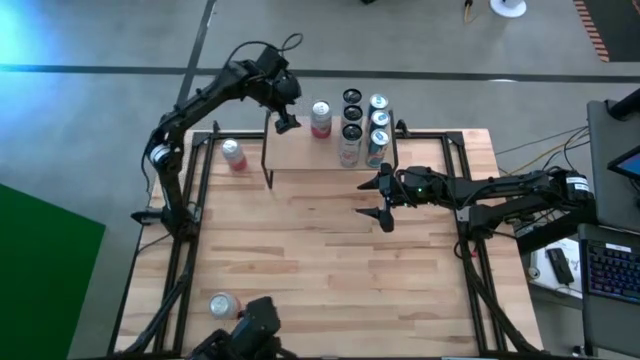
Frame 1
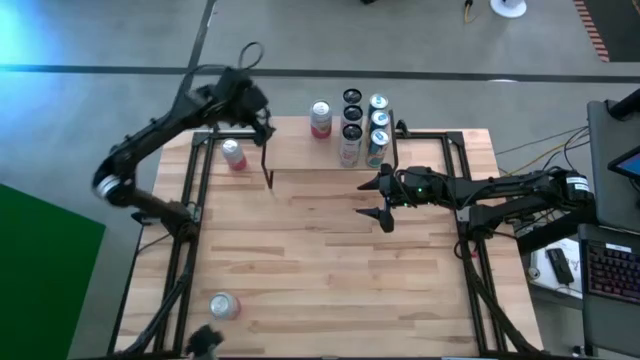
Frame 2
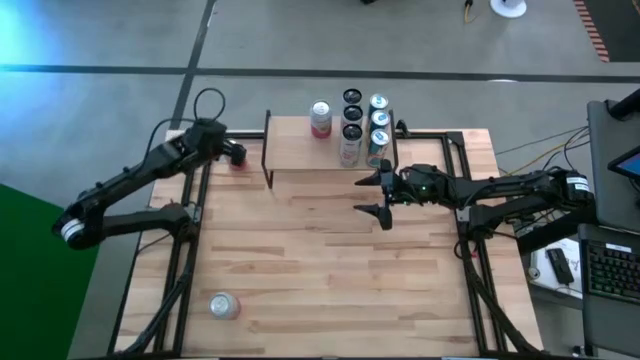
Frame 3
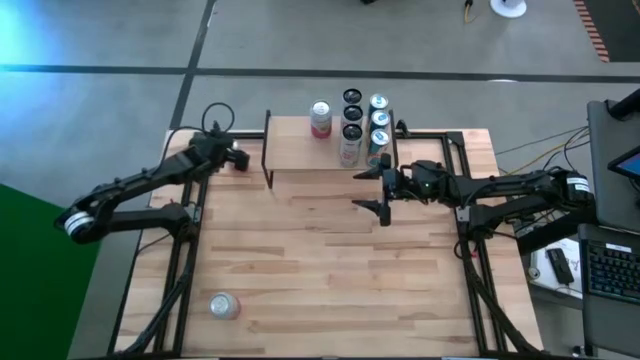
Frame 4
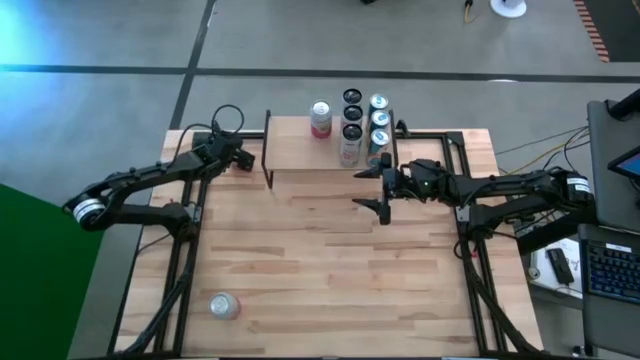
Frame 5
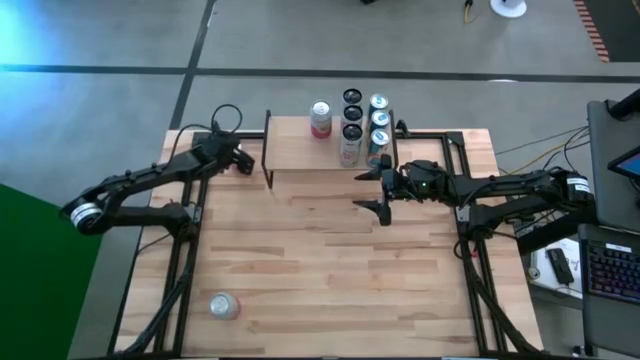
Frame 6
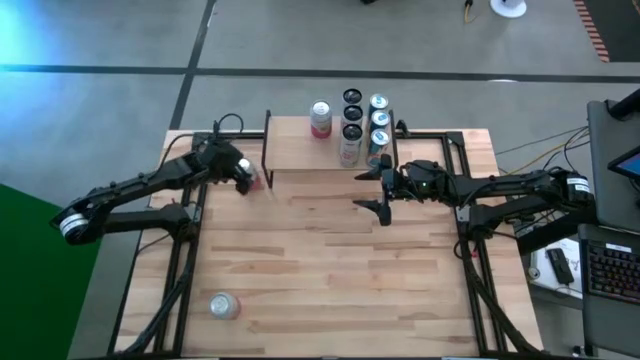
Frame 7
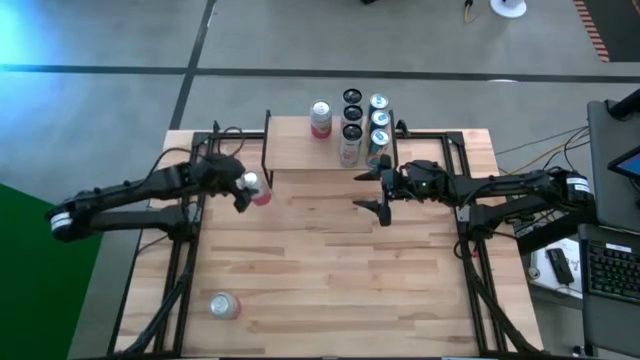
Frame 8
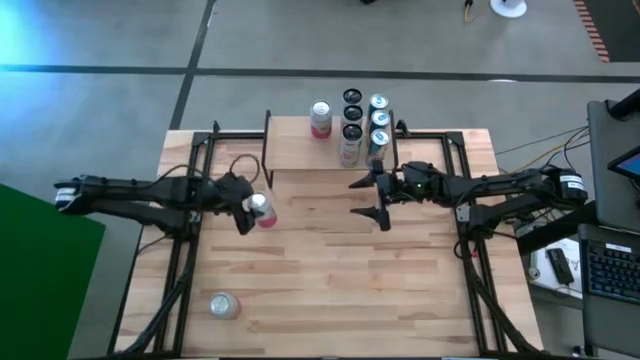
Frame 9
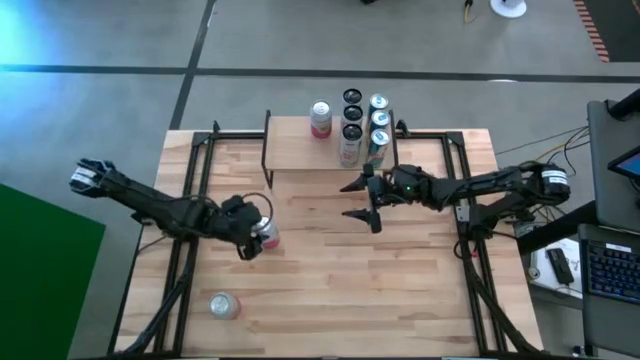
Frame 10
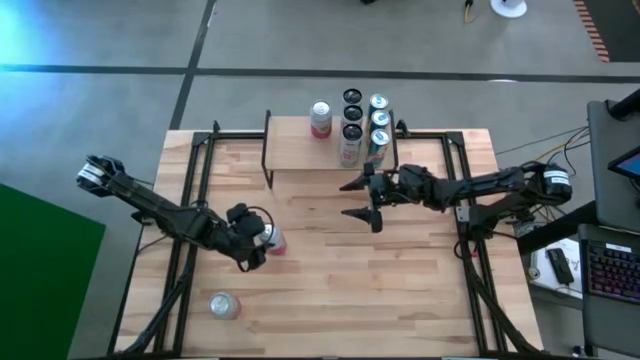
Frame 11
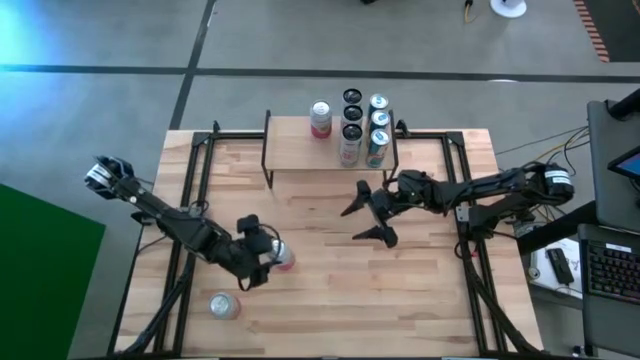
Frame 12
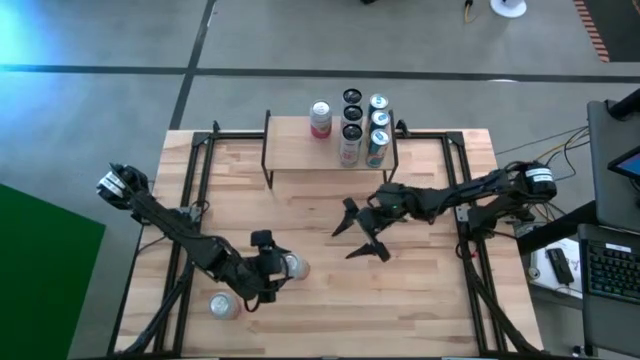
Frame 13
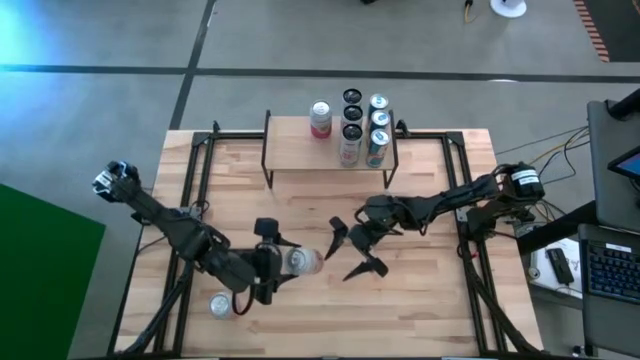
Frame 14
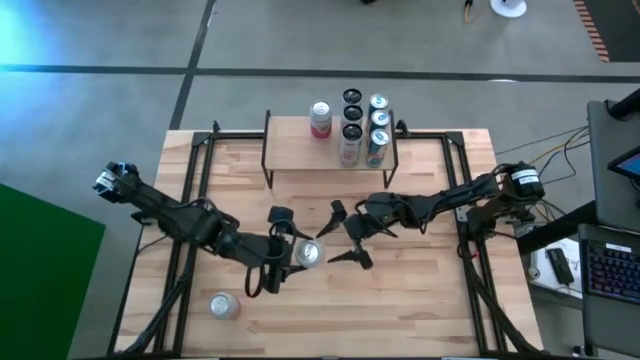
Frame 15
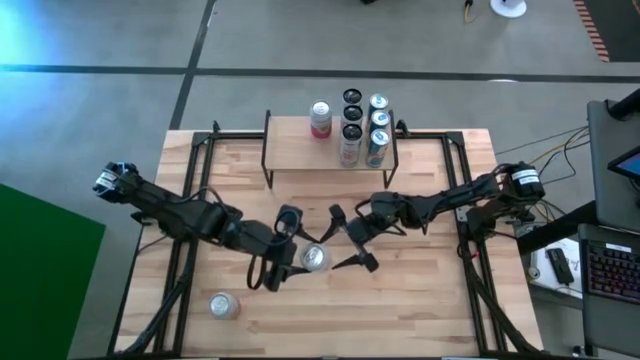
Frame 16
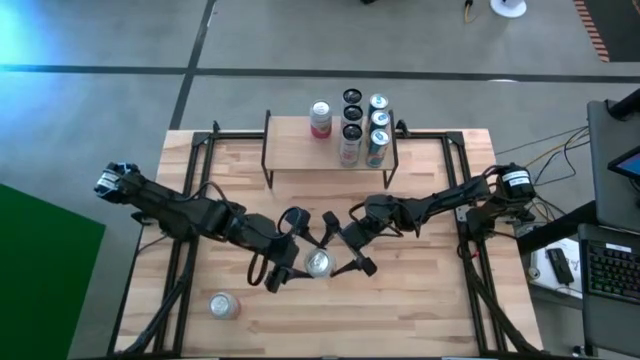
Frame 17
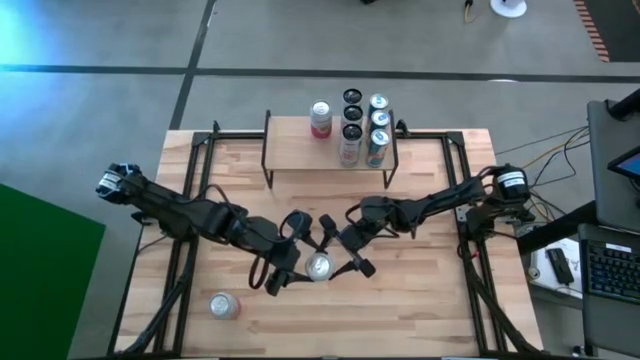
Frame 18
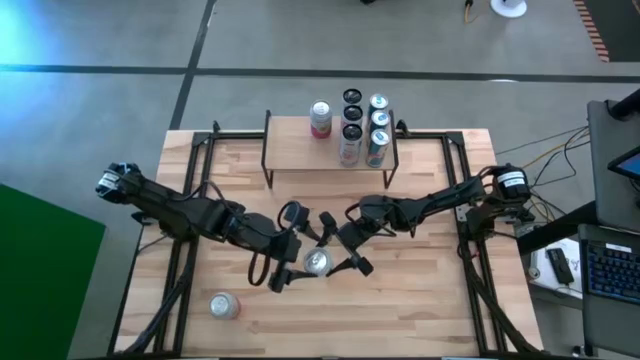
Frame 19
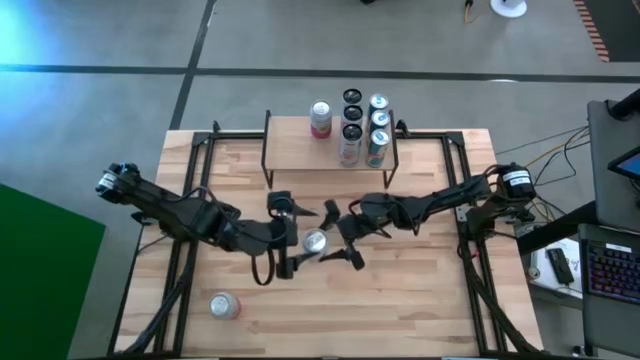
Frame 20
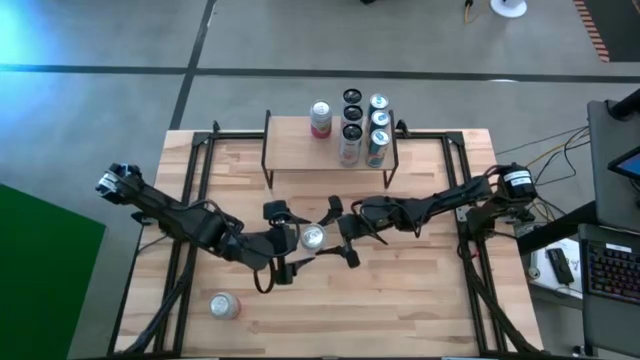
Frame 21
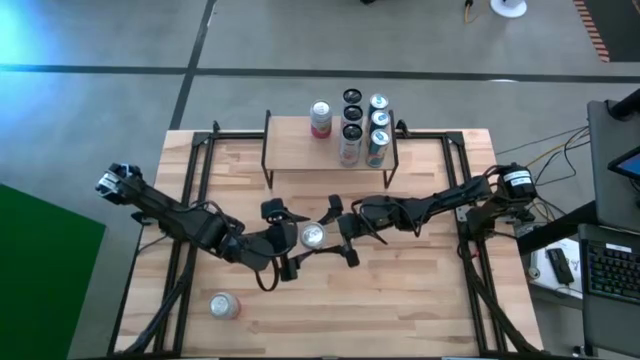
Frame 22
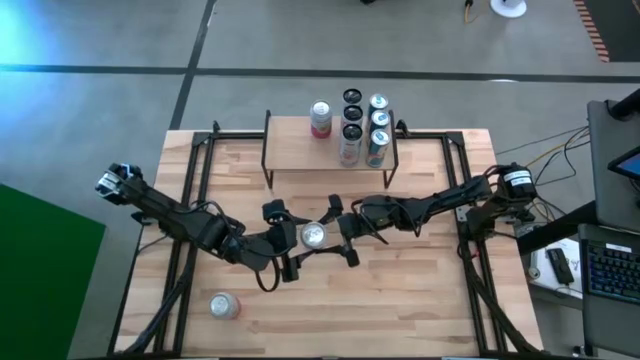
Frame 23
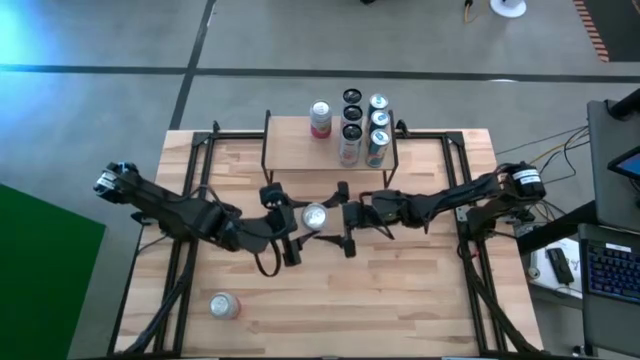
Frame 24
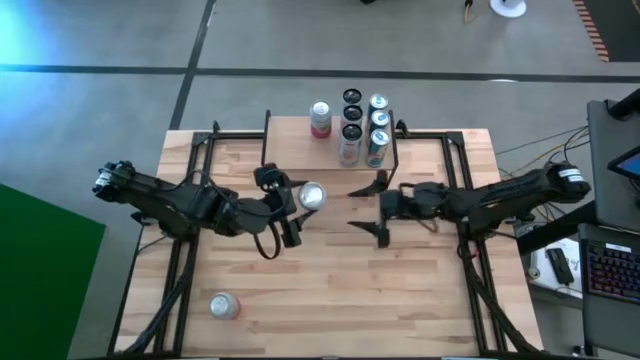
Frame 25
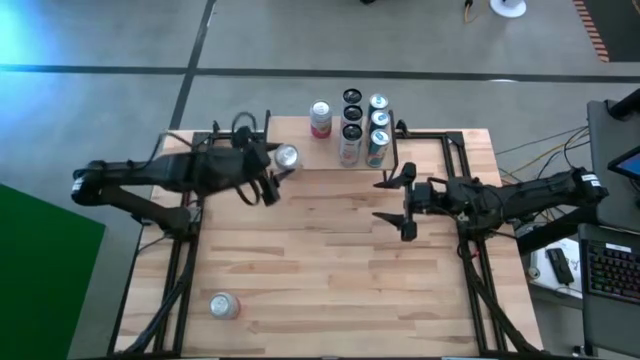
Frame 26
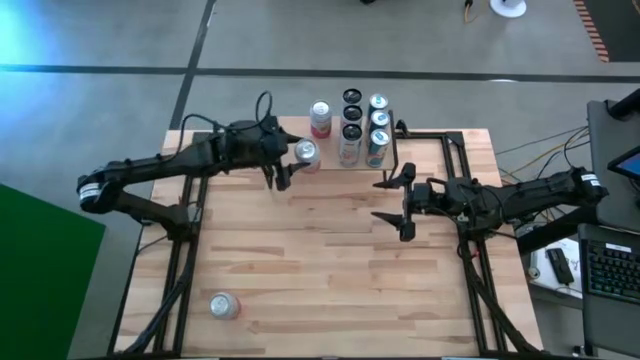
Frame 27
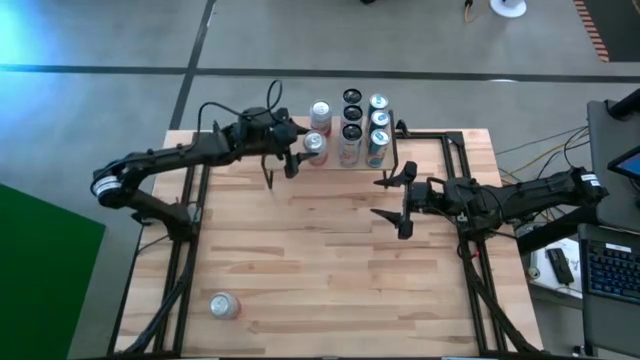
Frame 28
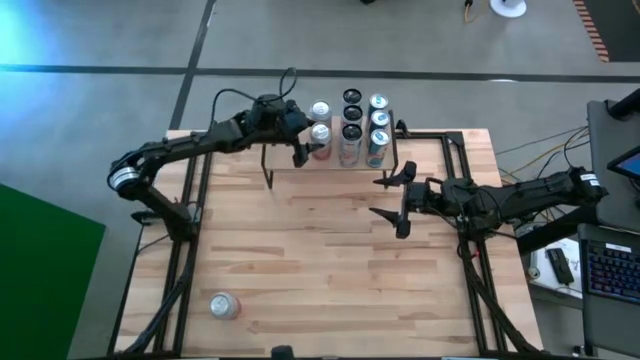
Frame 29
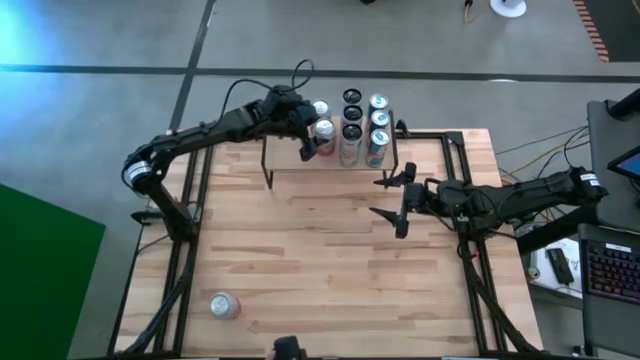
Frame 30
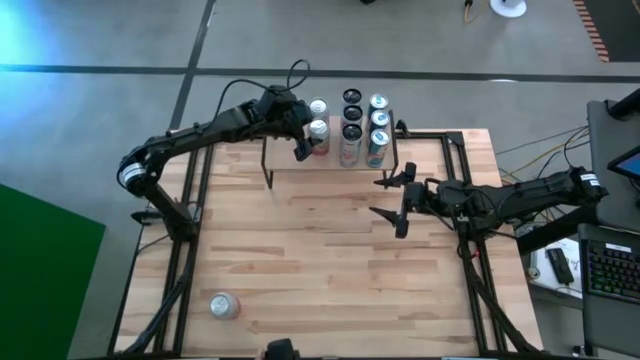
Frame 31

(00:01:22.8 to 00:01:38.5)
Task: Place canned beverage on shelf
Put the top pink white soda can on the shelf aligned with the other pink white soda can

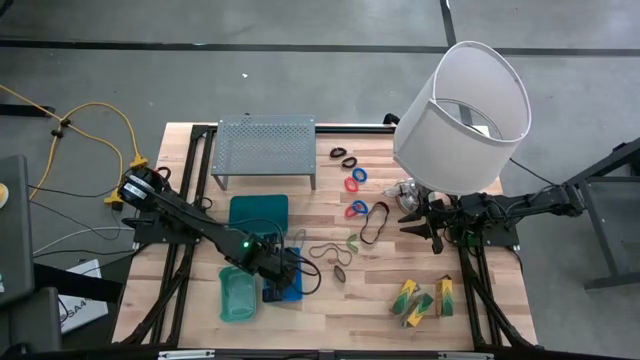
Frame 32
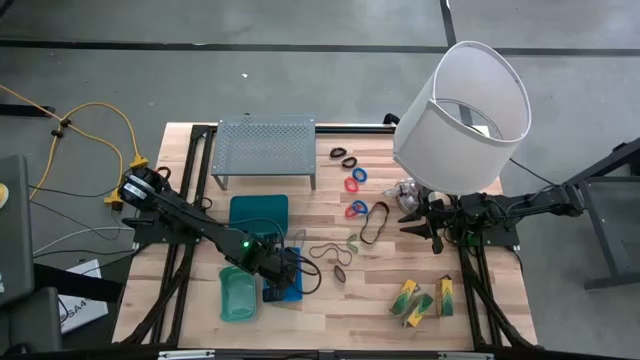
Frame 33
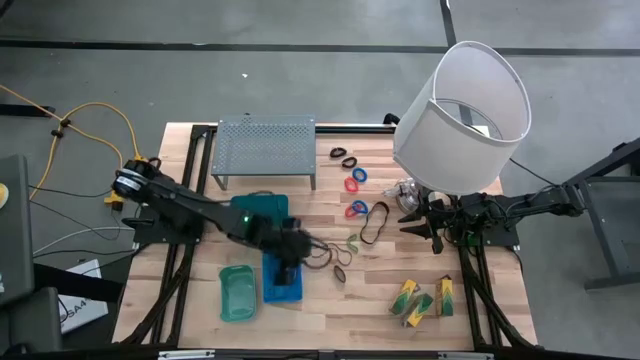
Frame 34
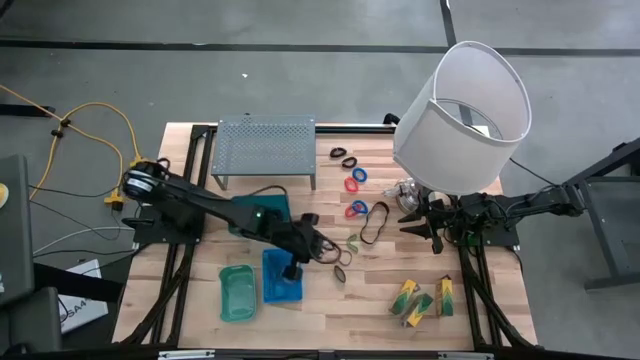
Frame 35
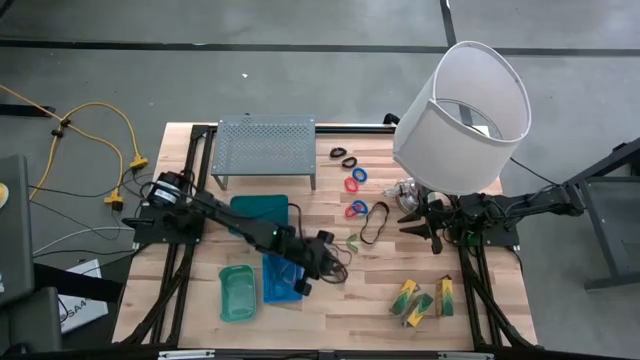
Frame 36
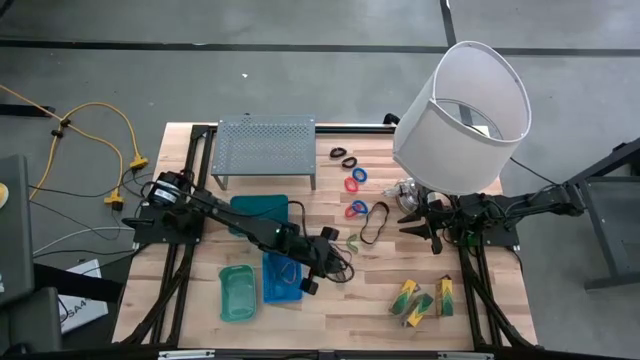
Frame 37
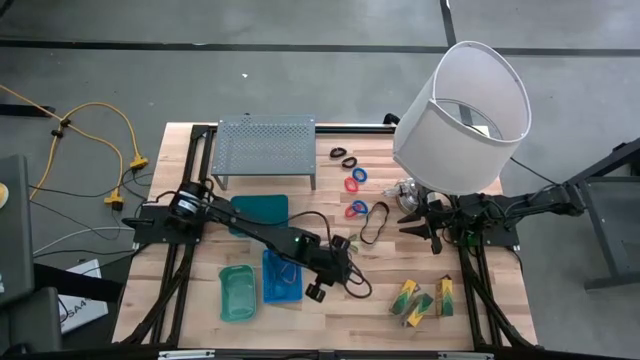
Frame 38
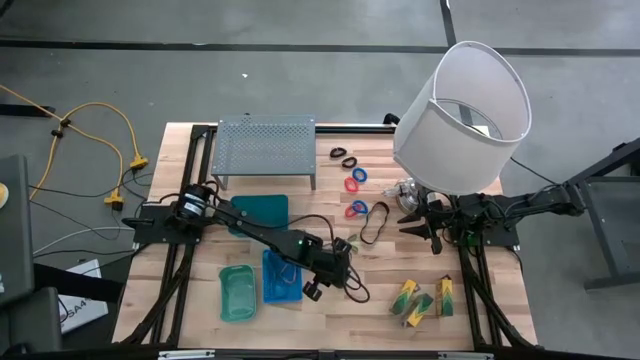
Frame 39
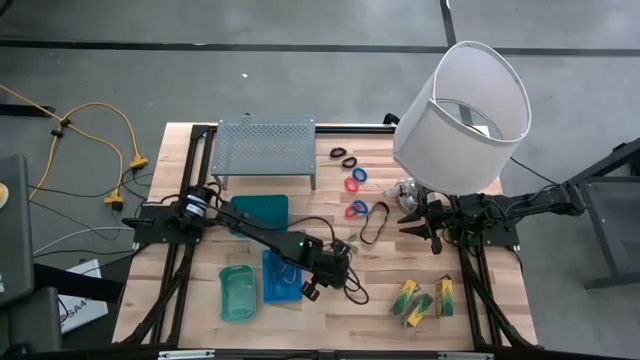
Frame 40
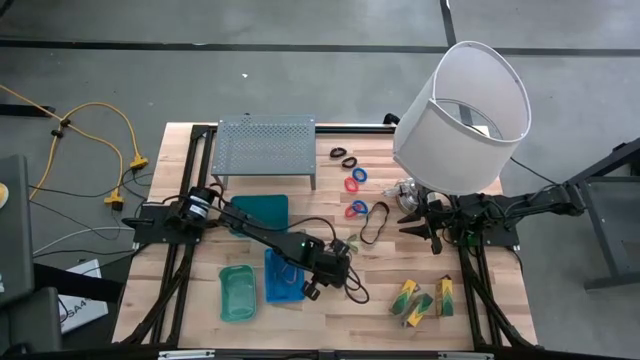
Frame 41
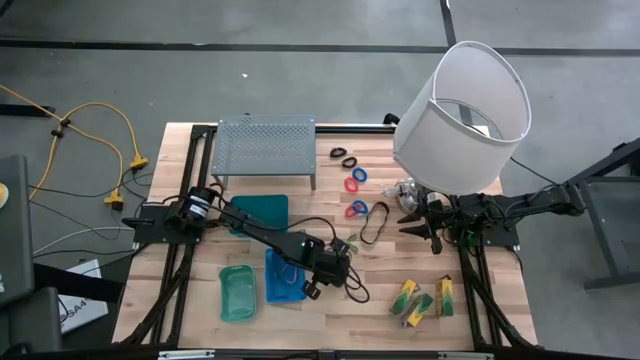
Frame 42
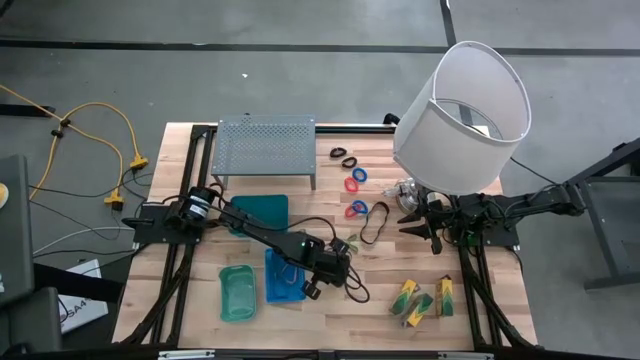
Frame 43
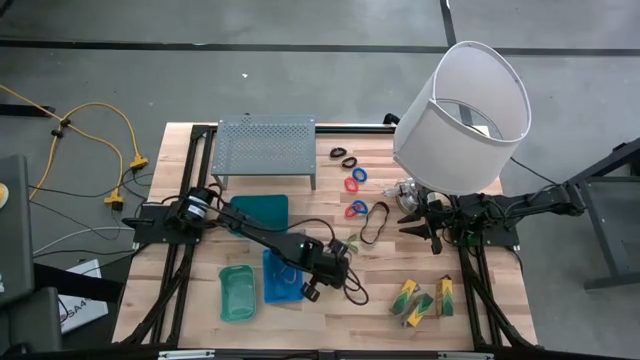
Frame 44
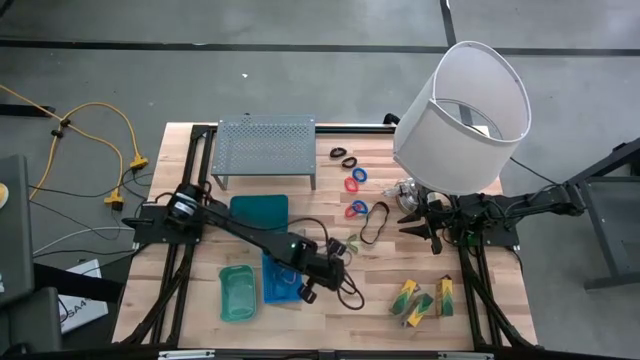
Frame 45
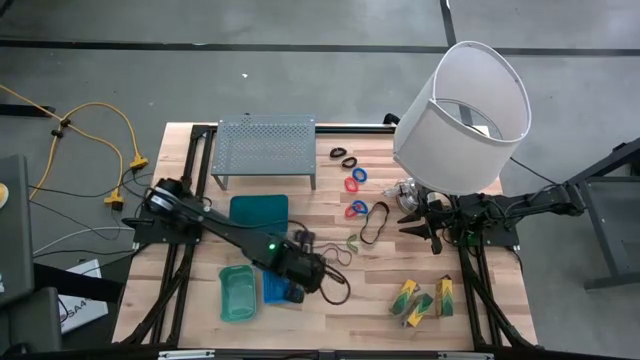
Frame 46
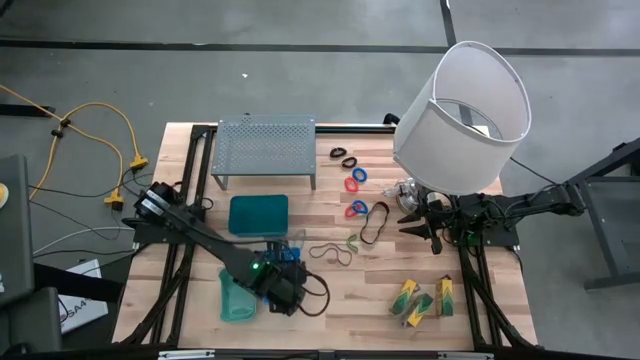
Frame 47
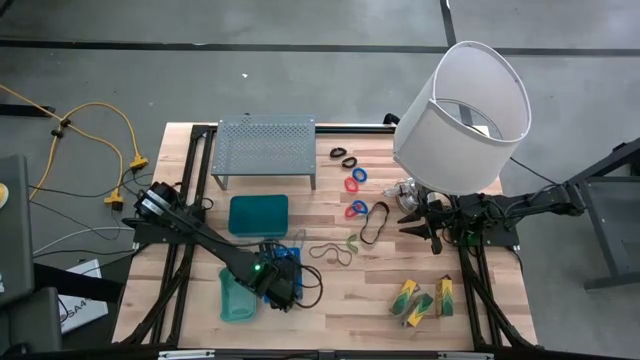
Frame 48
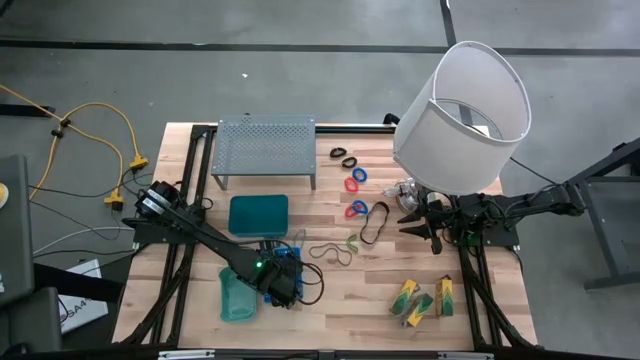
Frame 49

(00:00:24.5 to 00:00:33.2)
Task: Pick & Place Office Desk Supplies
Put the bottom black rubber band into the bottom blue bin
